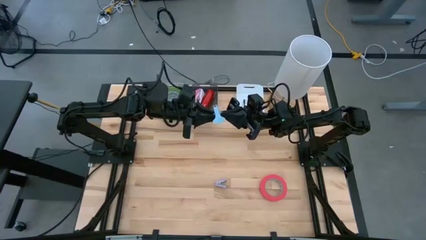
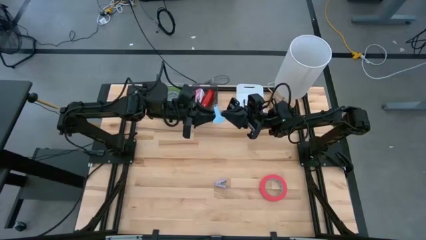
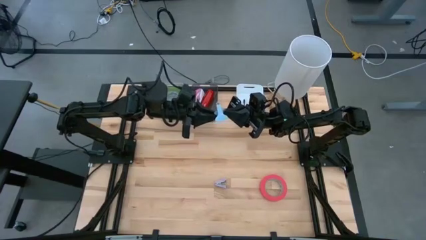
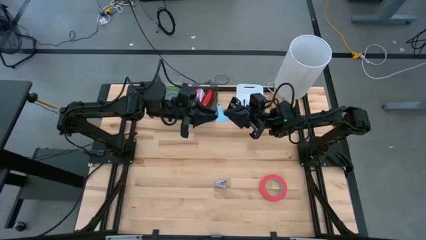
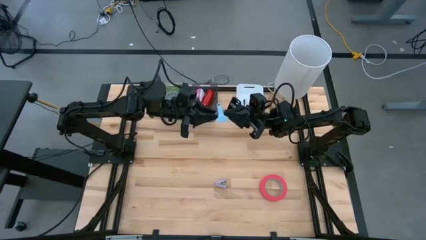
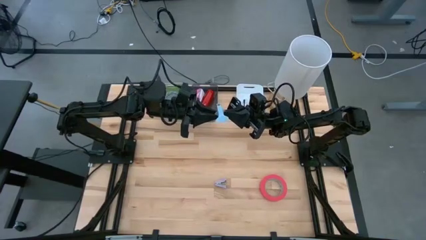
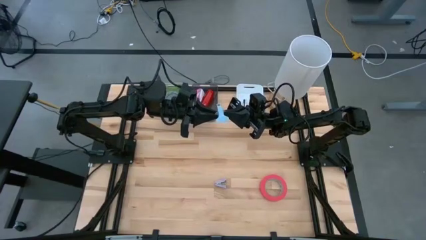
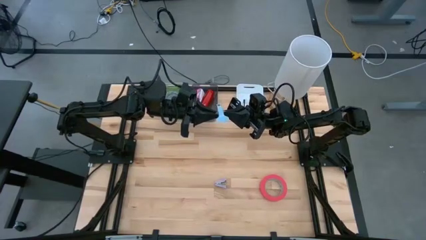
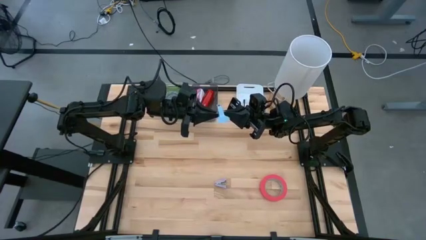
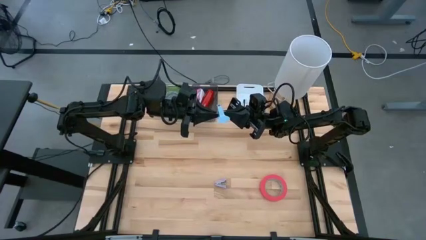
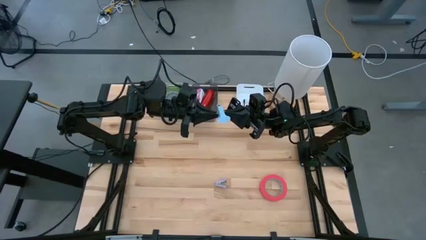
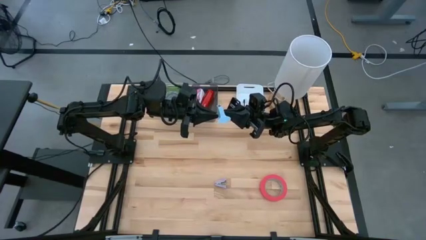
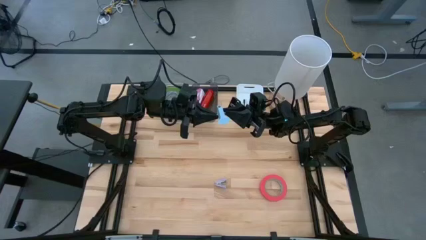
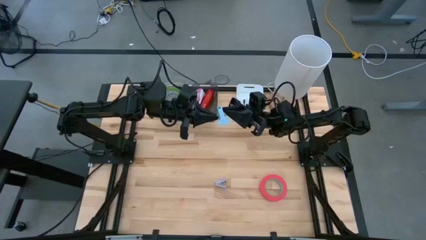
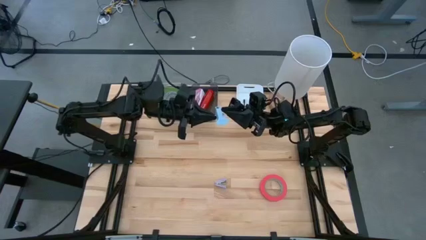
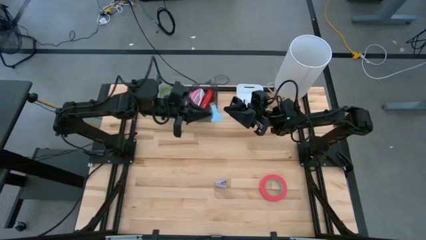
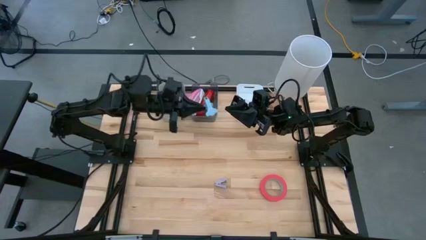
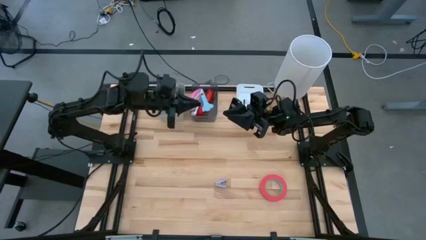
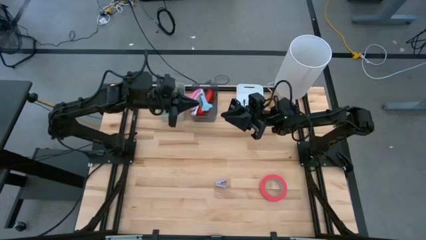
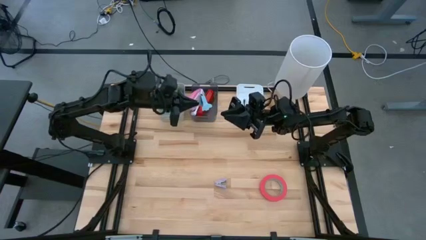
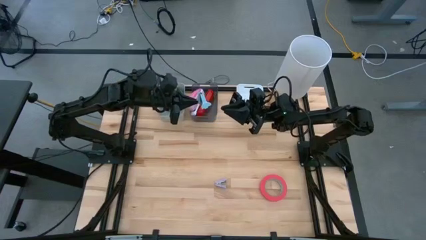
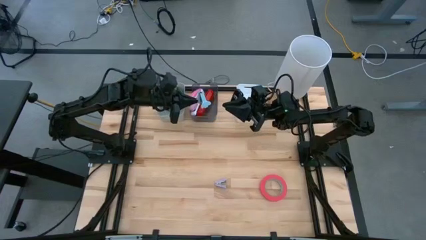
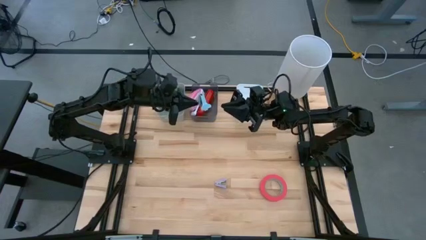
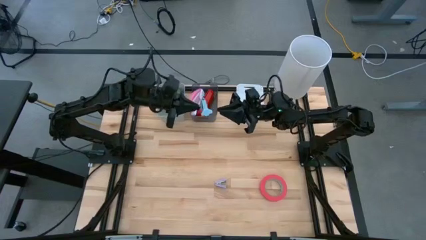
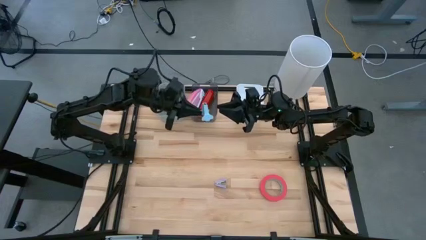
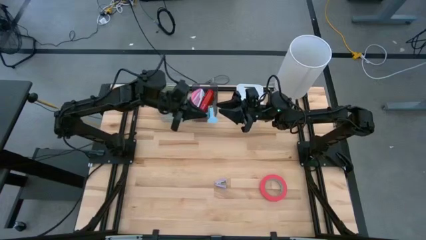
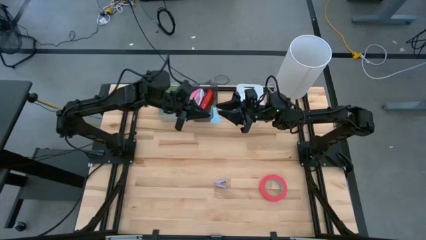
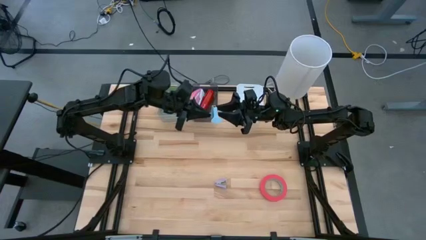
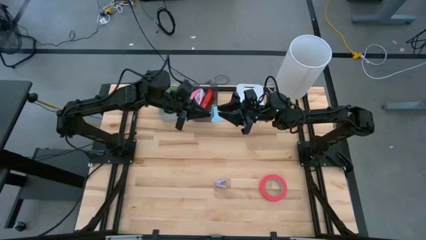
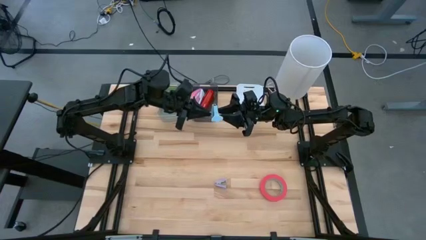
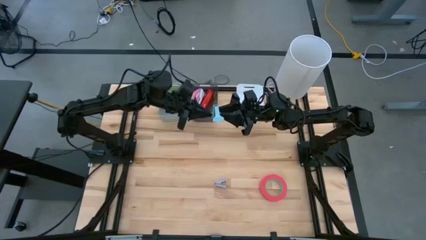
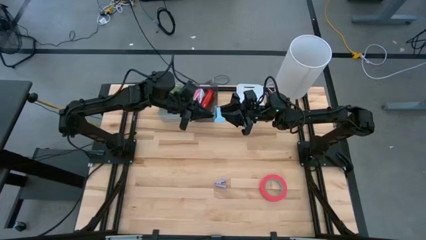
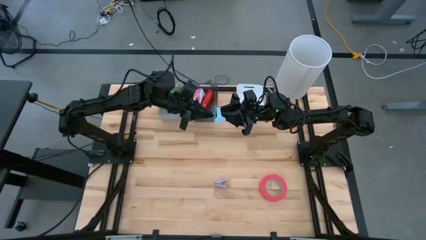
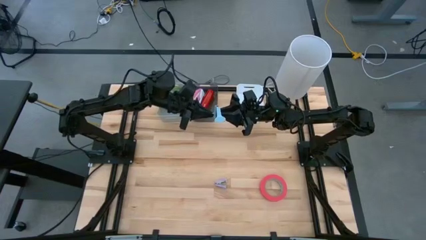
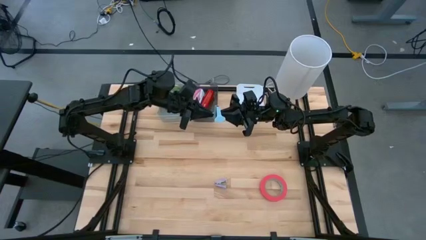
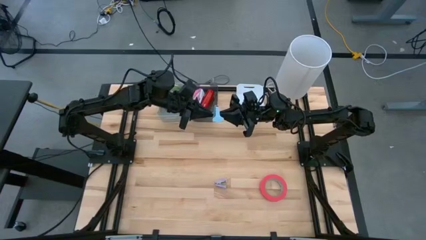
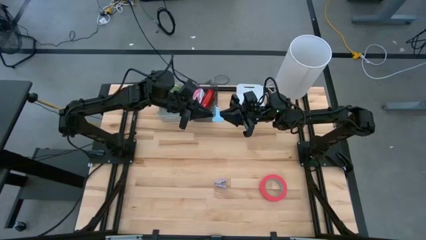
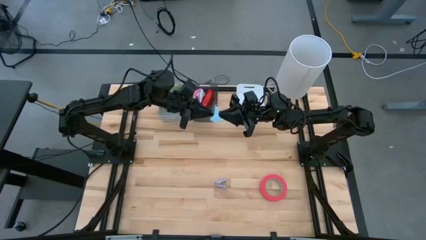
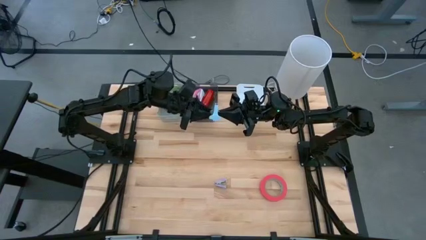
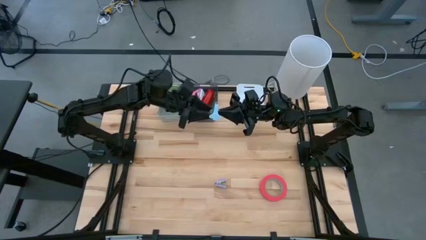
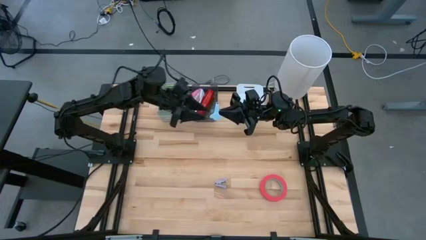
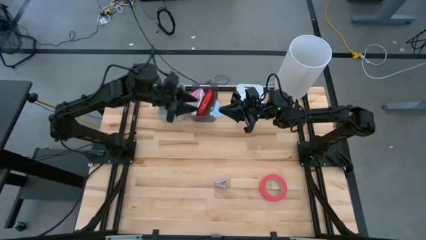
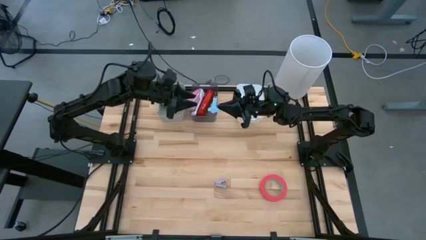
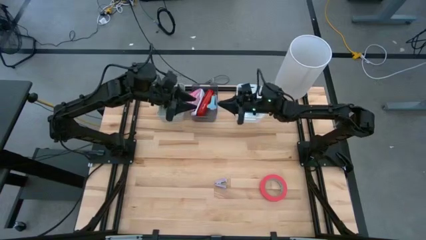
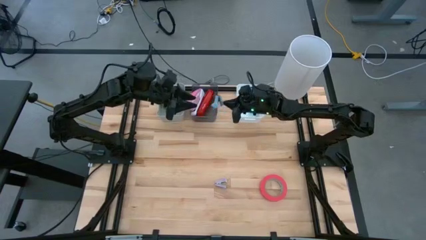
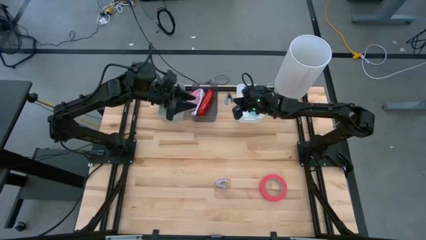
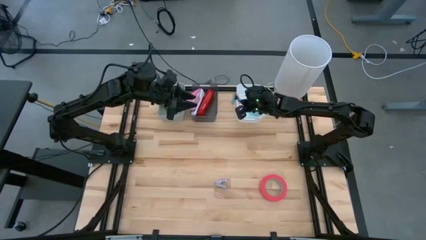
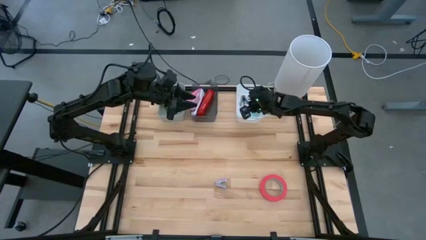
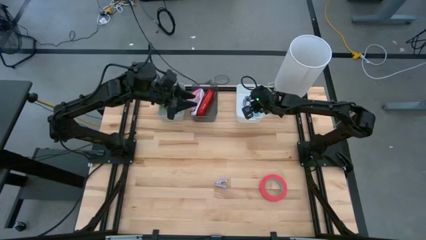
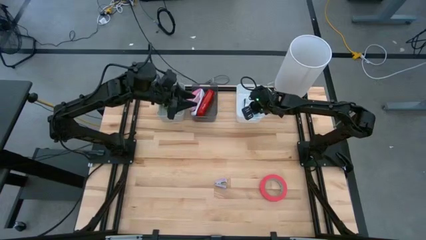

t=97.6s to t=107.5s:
Task: Pick and place Stapler, Stapler remover, tape
Put the light blue staple remover into the white bin

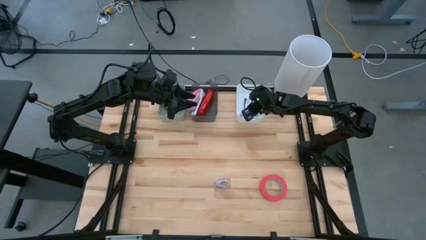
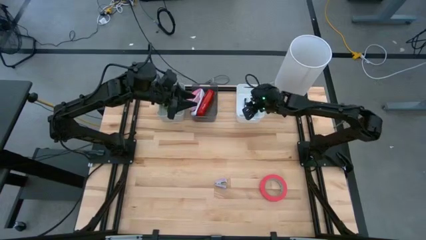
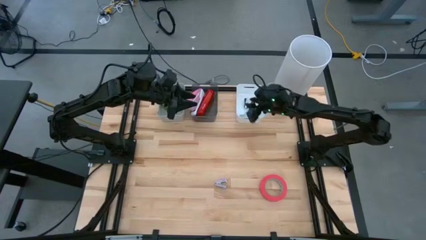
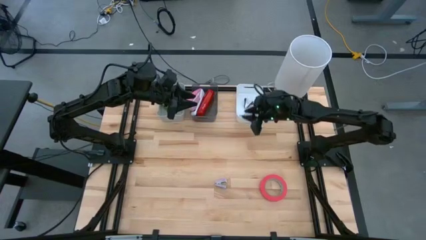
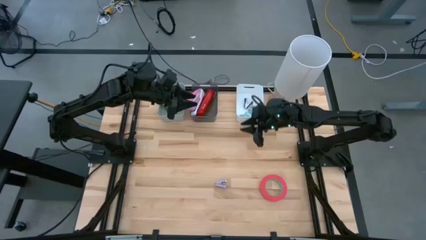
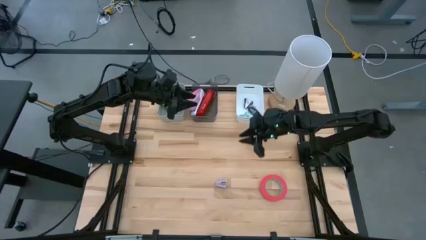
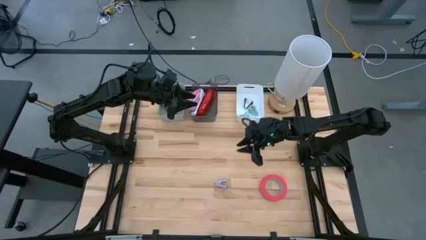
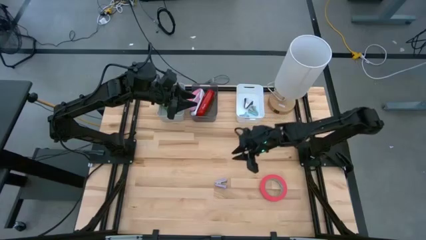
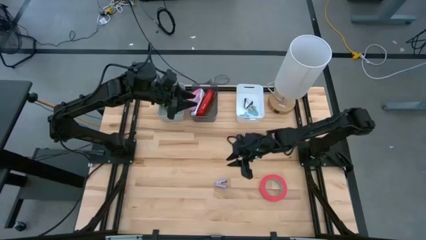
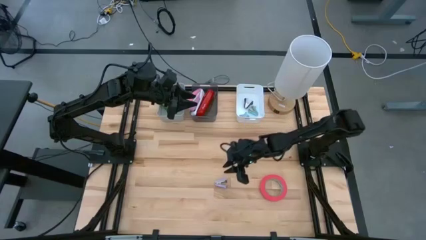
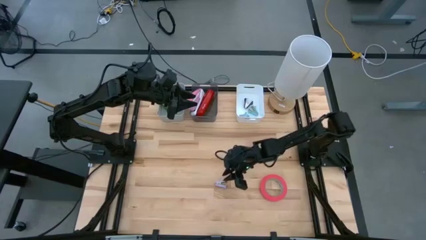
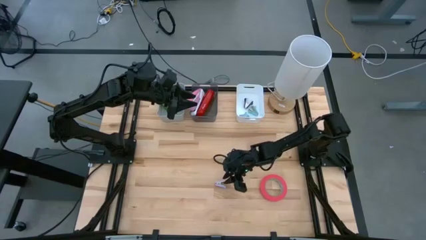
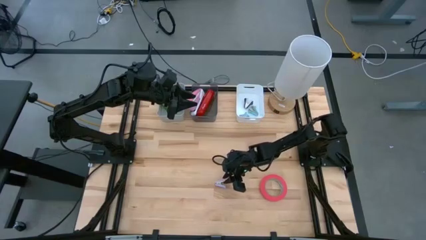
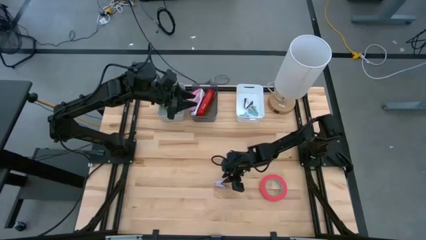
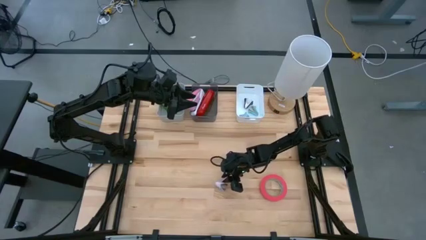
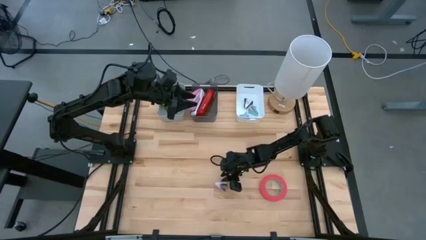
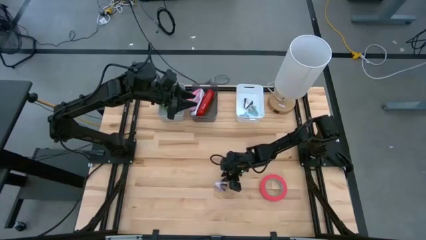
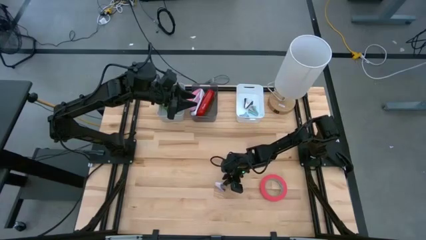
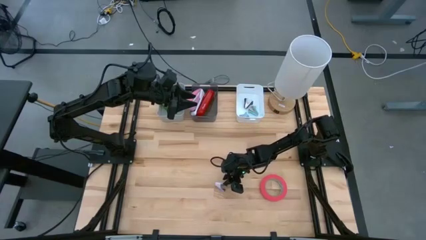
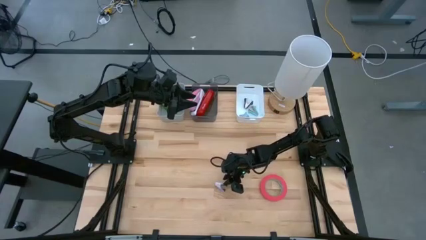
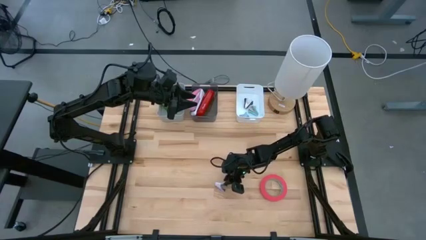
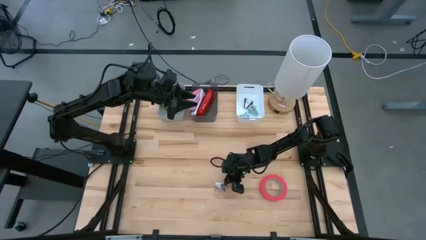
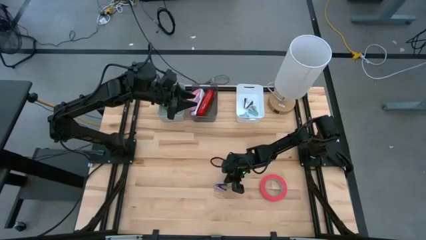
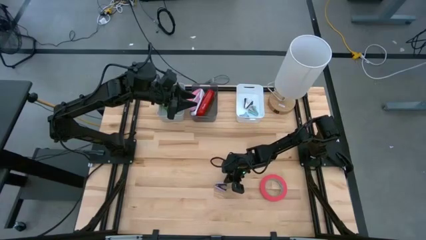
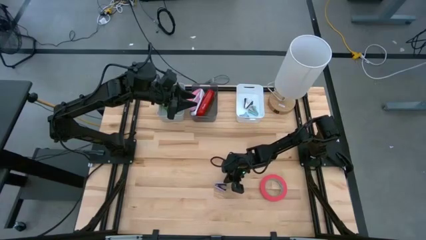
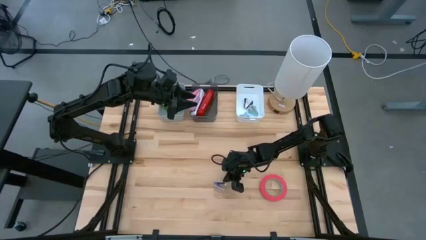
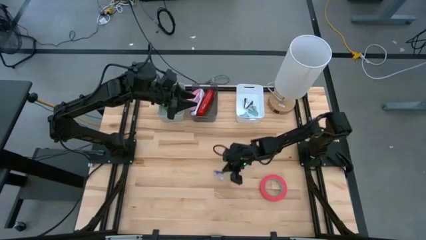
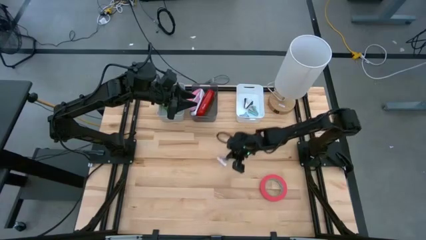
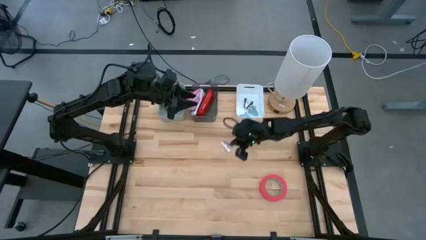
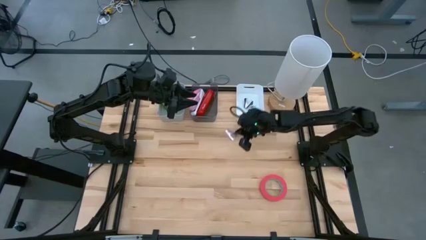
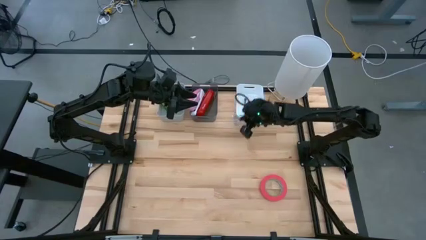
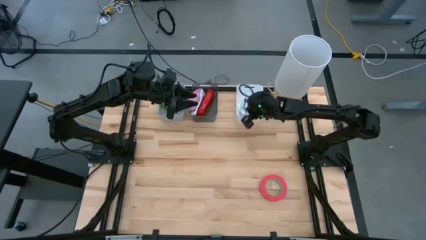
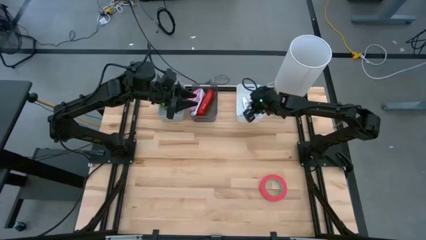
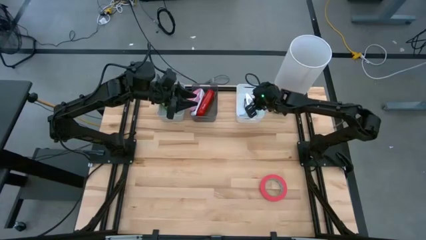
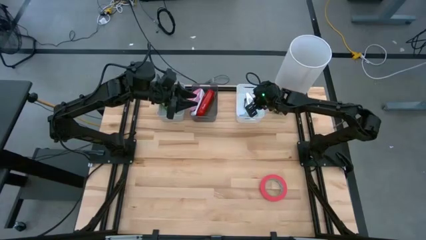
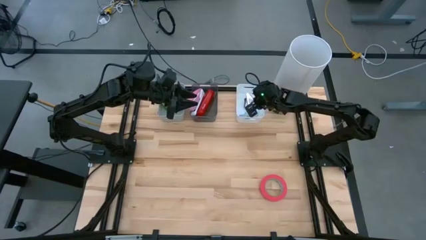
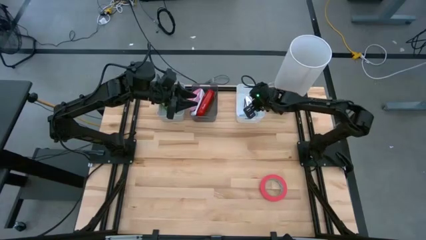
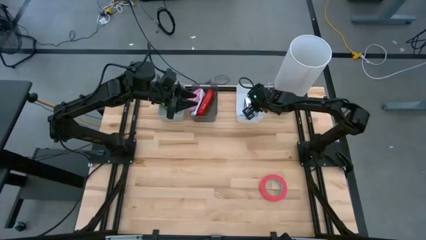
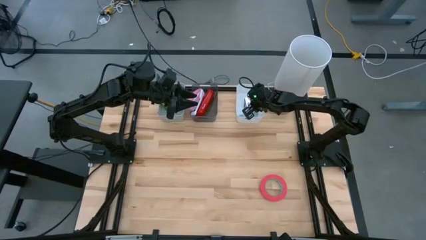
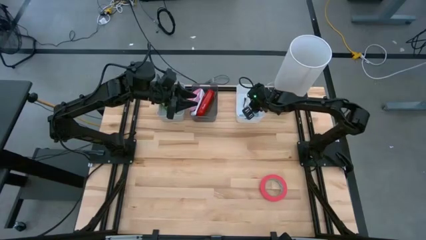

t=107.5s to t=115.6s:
Put the violet staple remover into the white bin
